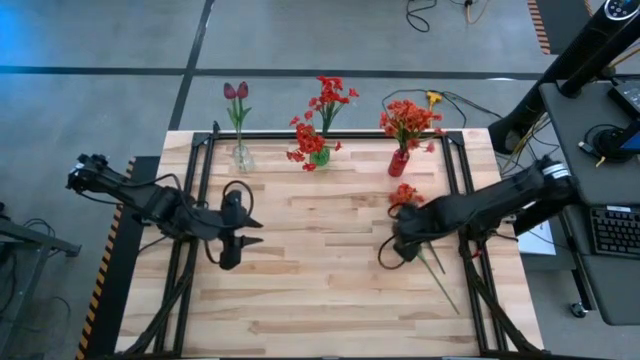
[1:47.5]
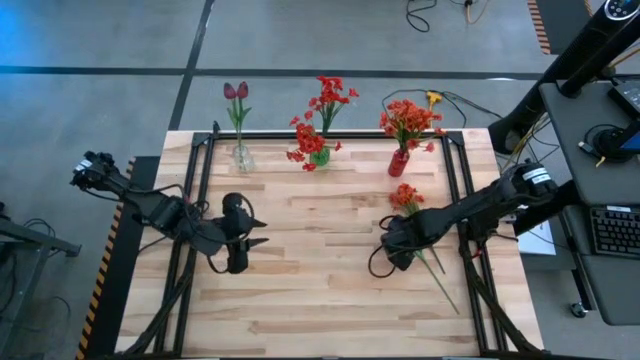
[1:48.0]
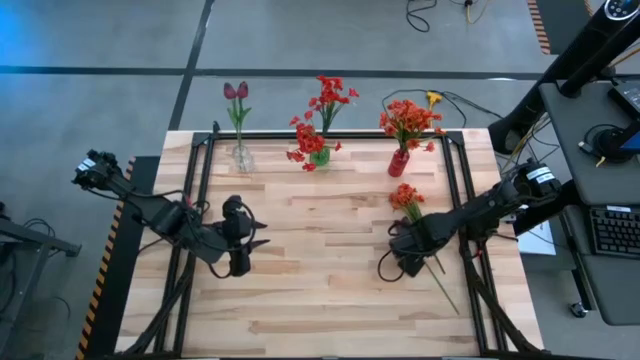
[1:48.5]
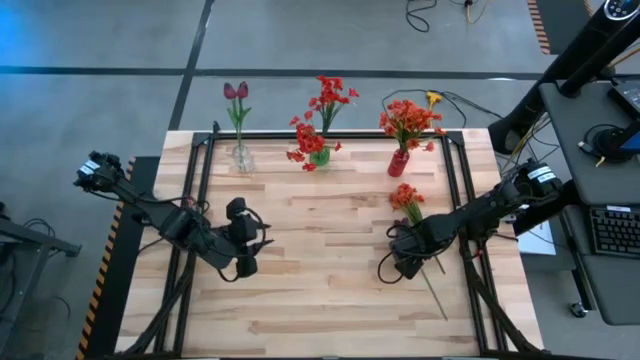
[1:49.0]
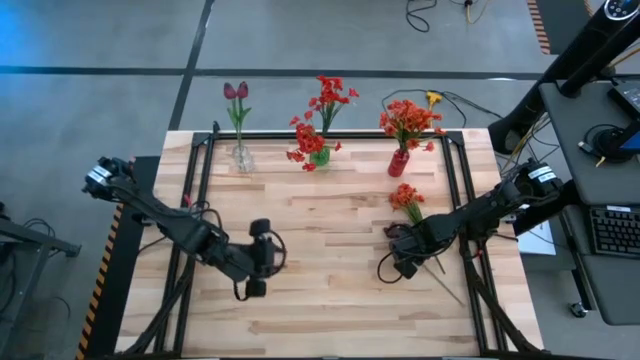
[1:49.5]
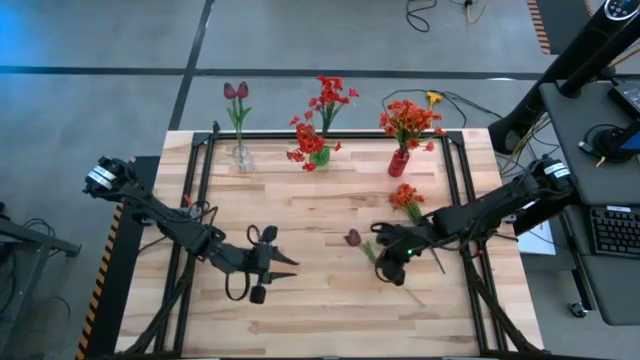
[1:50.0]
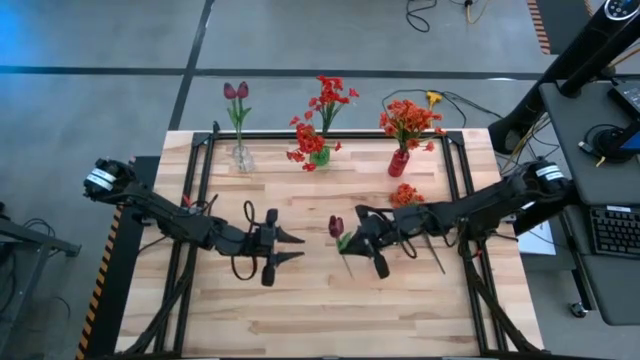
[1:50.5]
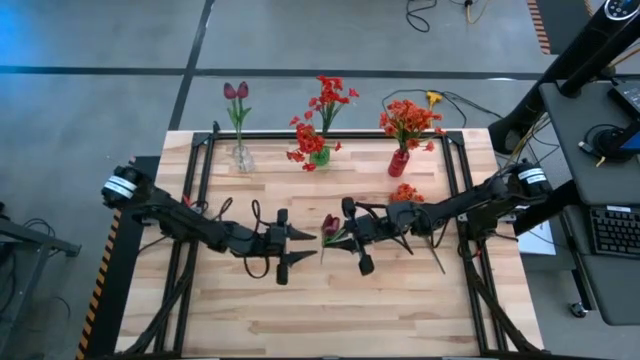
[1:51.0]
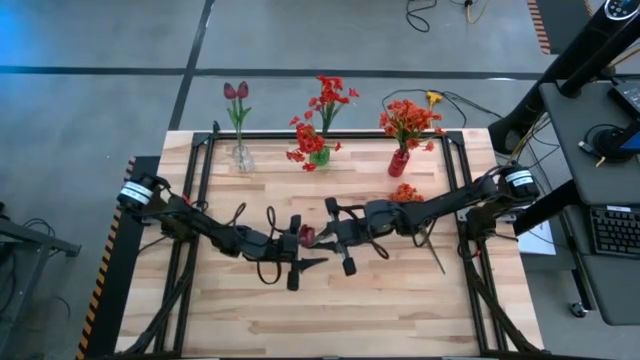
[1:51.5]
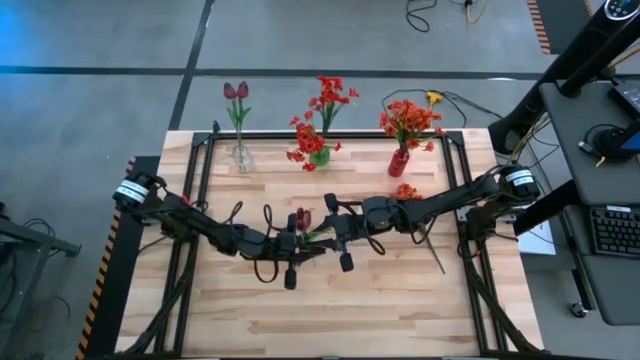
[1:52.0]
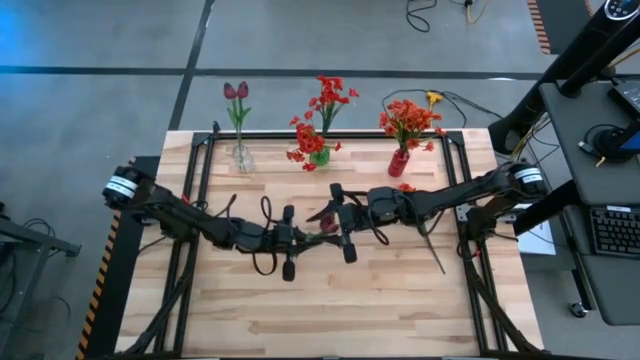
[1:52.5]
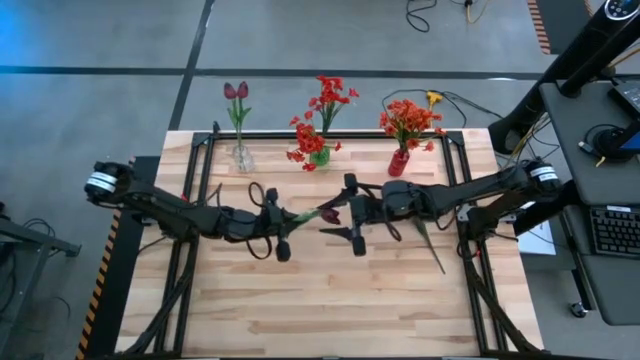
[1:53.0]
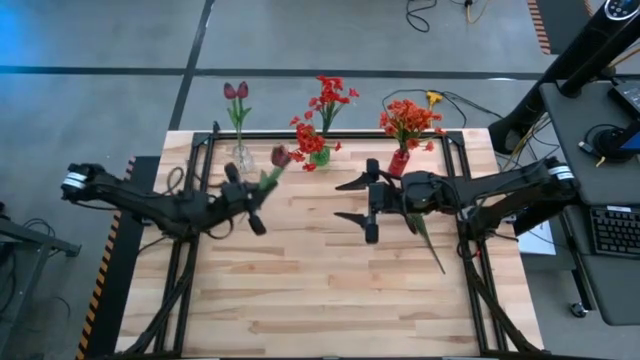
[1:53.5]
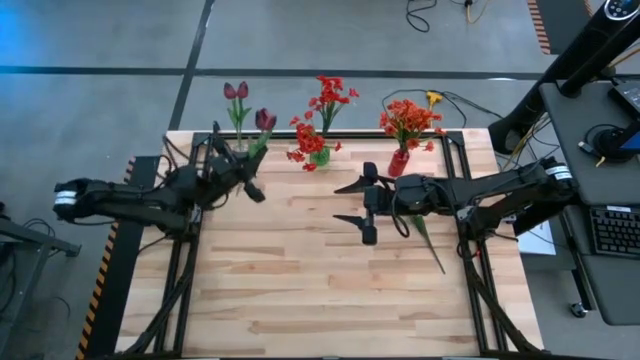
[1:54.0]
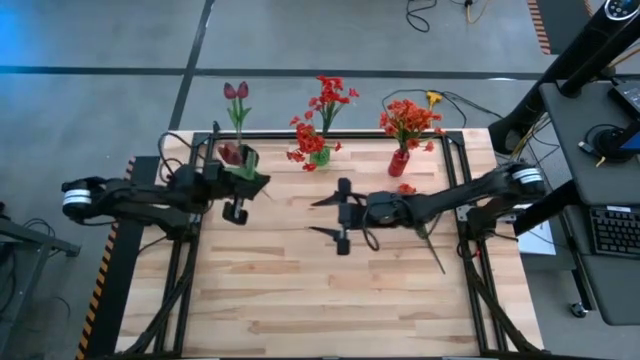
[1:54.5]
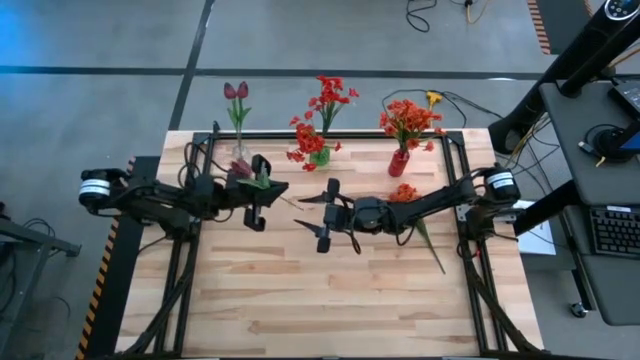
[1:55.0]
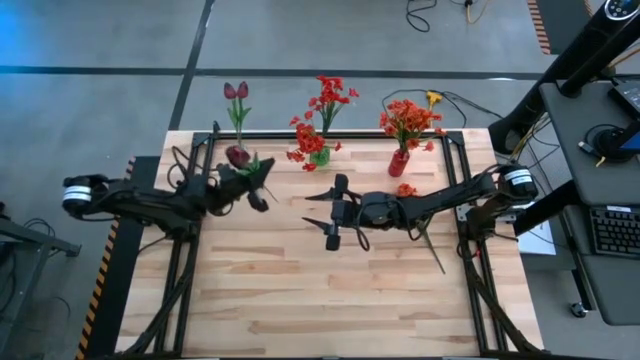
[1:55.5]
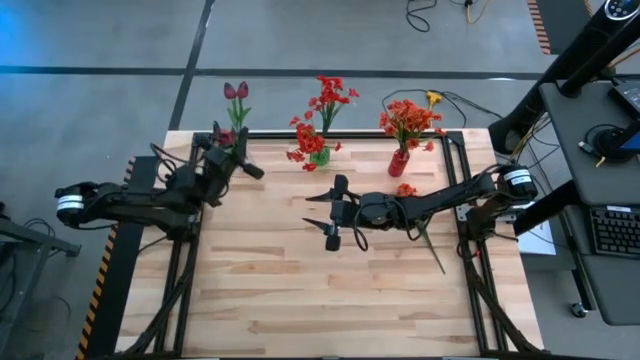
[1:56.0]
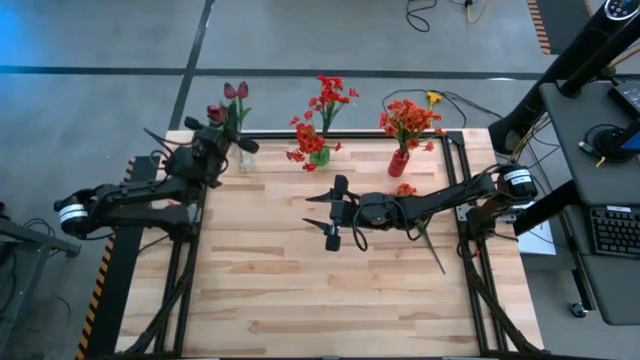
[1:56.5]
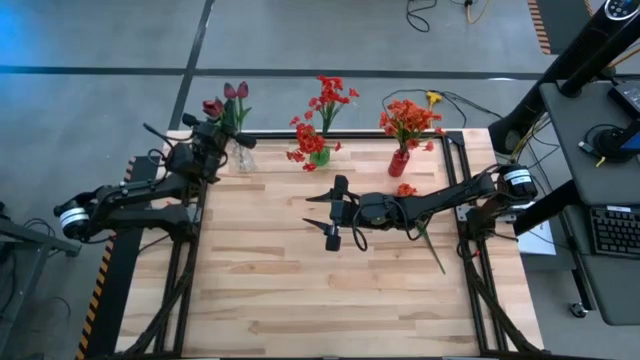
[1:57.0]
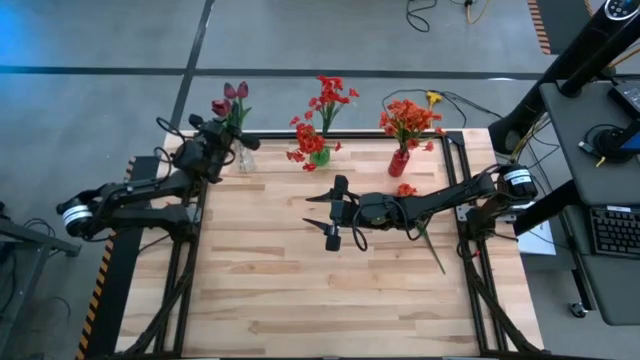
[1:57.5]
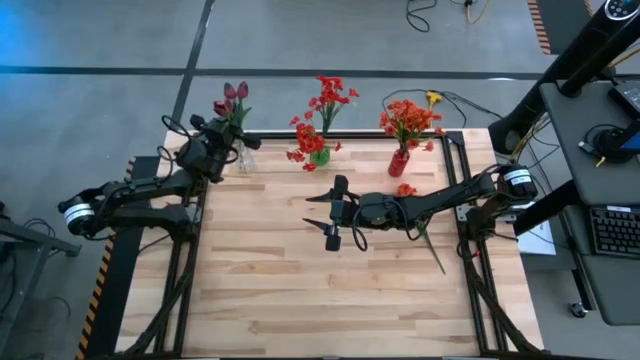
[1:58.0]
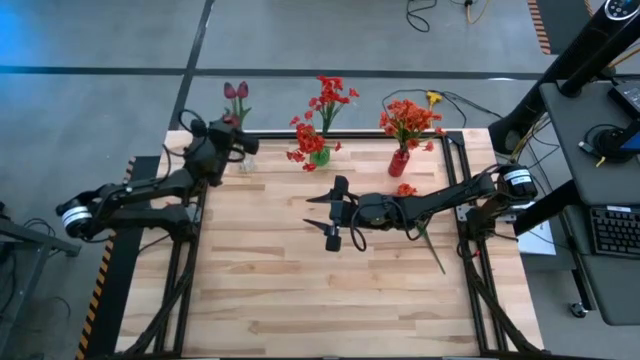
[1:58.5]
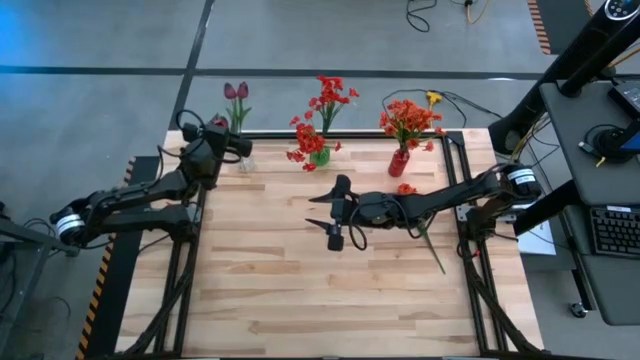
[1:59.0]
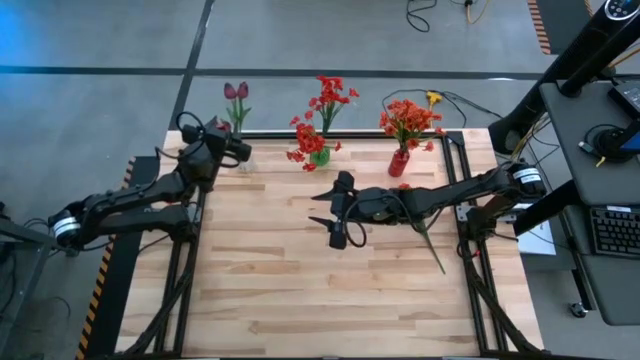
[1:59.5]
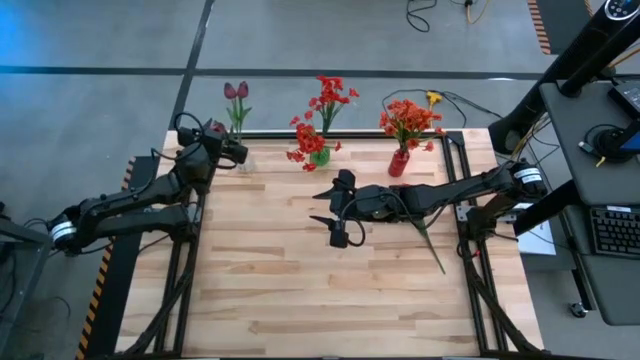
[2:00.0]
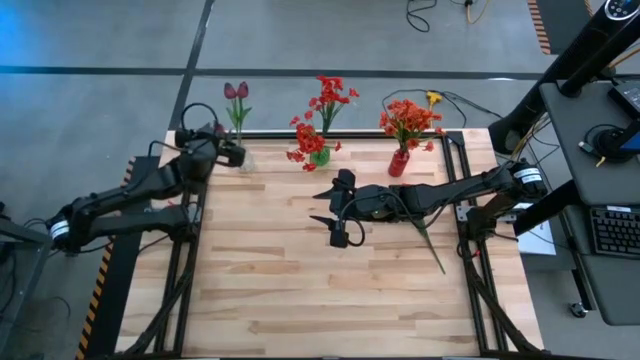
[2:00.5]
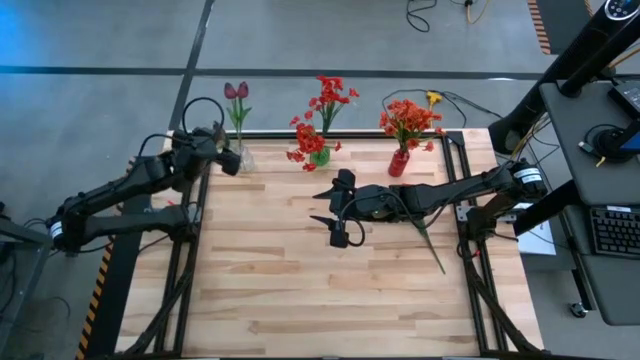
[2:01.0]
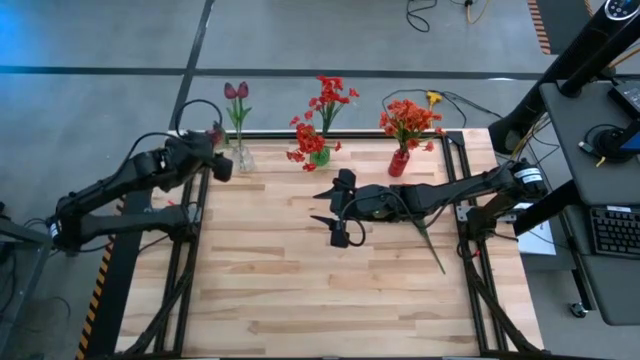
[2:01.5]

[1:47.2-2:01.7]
Task: Sort flowers into vase by color
Put the purple tulip into the transparent vase
